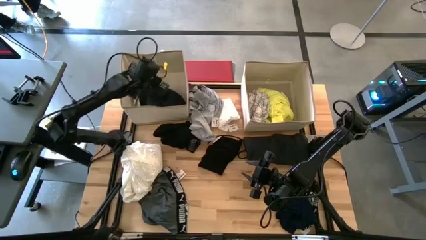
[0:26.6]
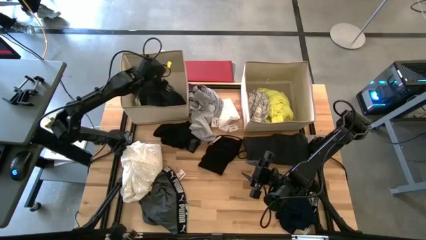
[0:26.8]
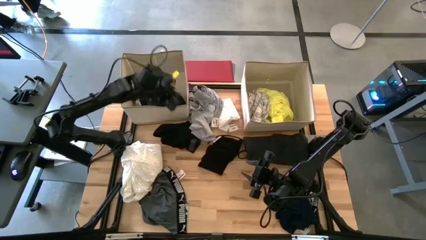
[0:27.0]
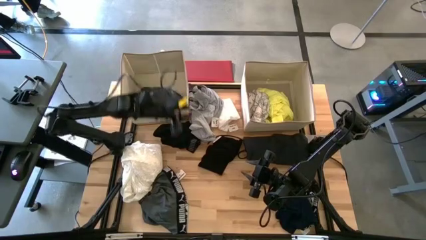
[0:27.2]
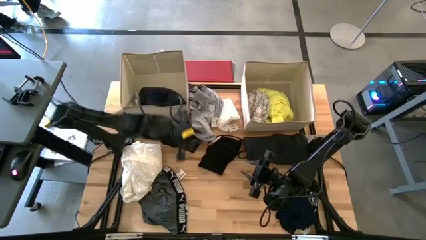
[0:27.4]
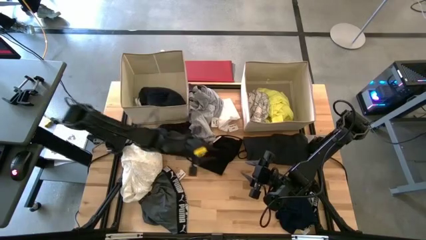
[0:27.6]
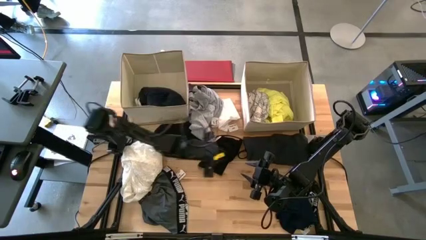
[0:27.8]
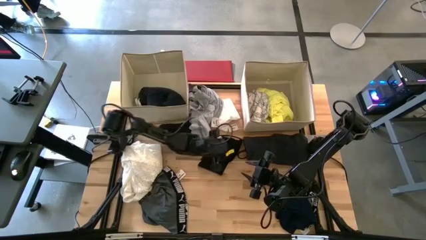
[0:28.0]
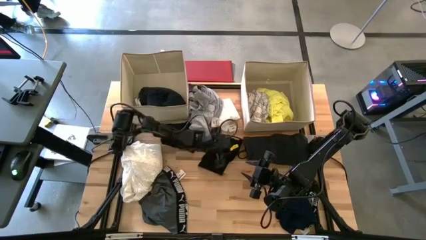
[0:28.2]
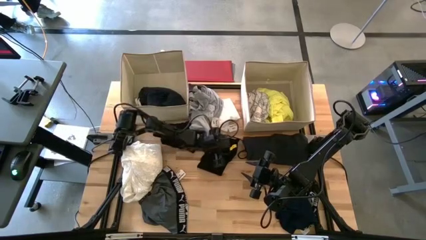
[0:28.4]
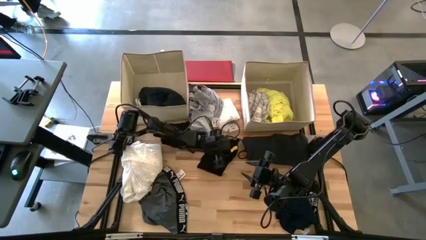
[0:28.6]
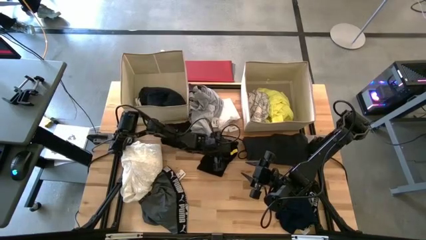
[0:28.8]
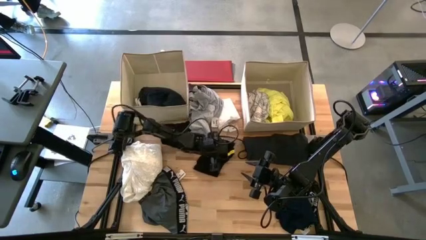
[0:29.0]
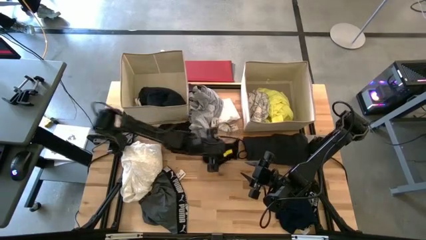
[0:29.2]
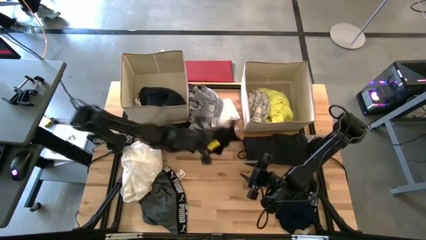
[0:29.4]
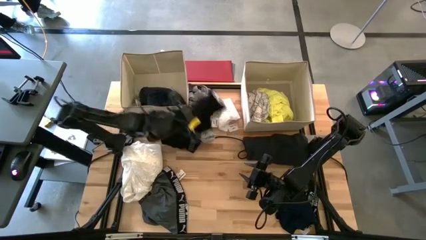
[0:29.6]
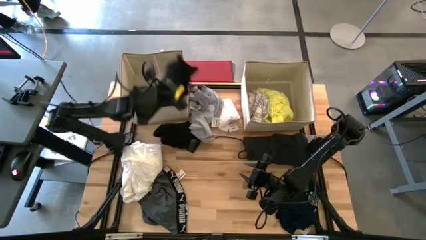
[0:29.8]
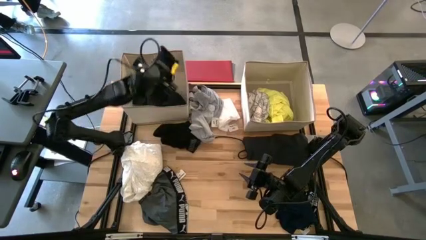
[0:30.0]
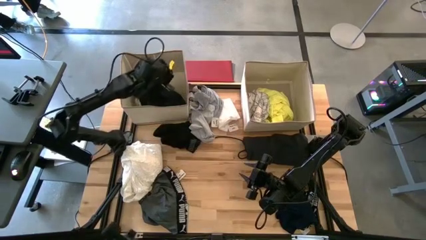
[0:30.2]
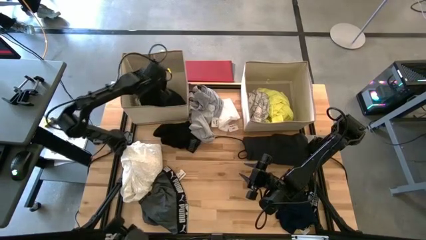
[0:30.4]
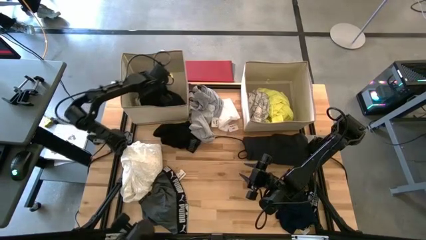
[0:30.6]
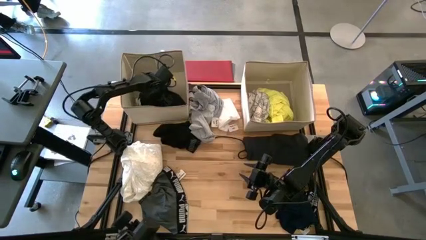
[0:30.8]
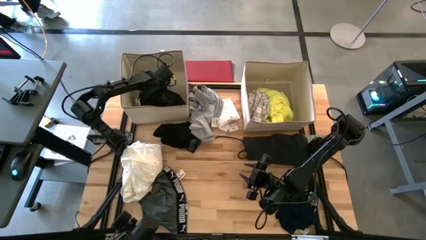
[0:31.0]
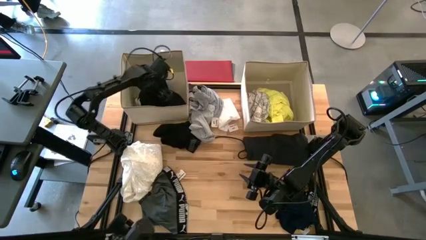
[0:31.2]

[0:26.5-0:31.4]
Task: Sort clothes
Put the black shirt into the left laundry organizer

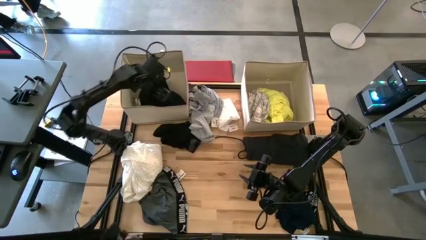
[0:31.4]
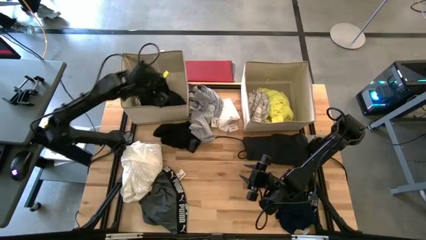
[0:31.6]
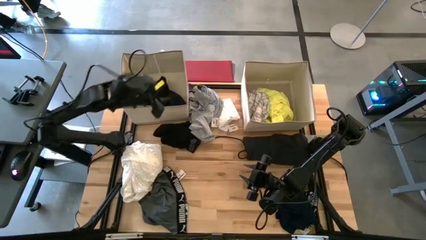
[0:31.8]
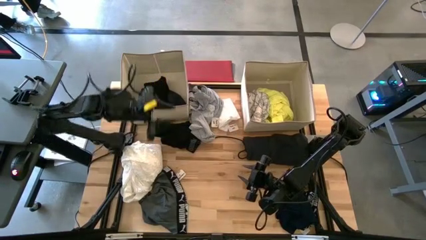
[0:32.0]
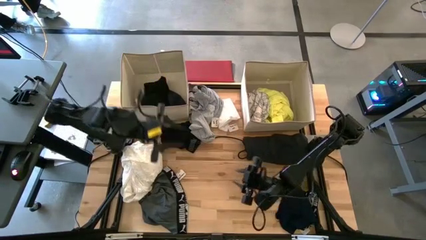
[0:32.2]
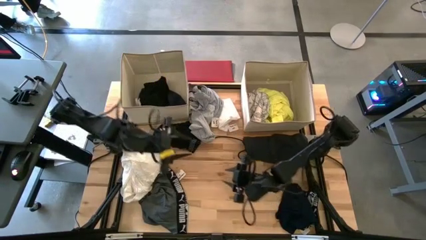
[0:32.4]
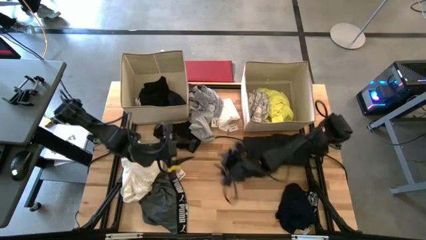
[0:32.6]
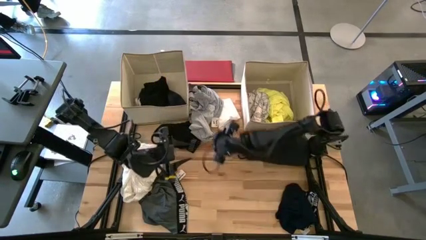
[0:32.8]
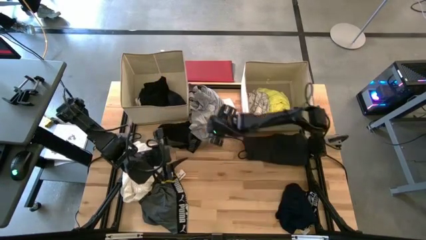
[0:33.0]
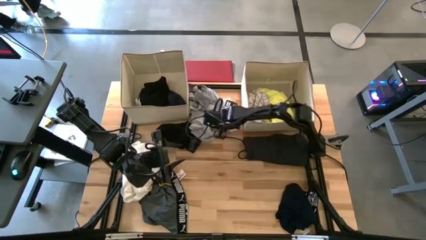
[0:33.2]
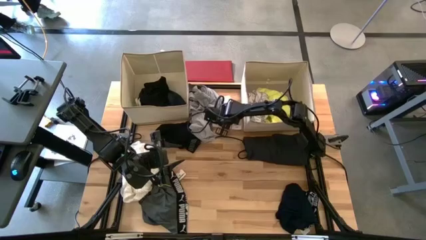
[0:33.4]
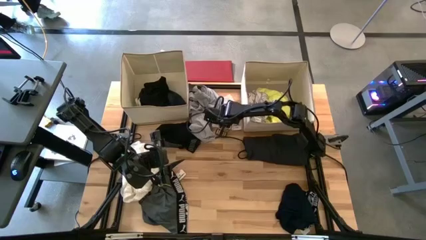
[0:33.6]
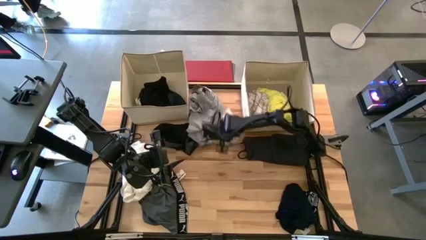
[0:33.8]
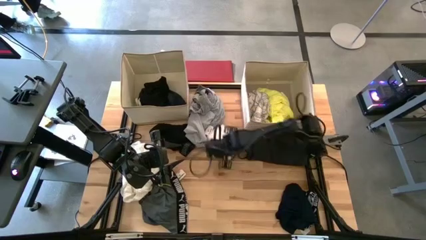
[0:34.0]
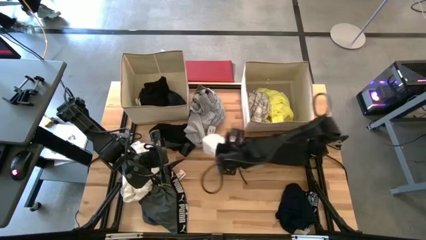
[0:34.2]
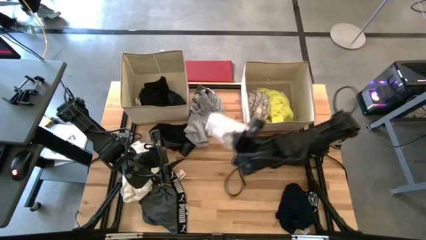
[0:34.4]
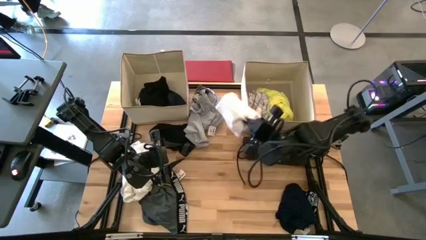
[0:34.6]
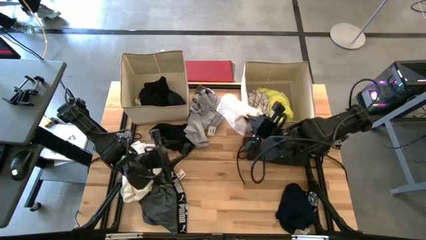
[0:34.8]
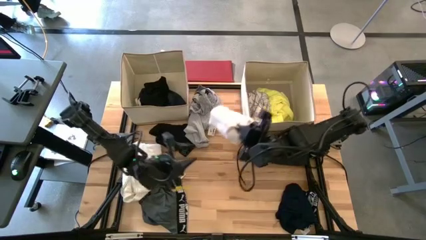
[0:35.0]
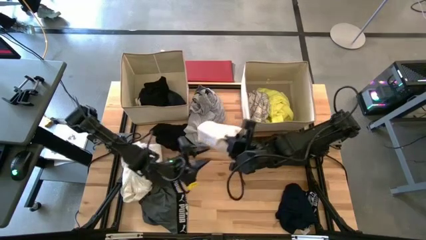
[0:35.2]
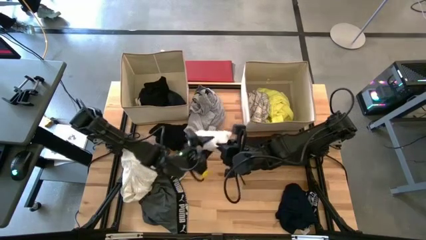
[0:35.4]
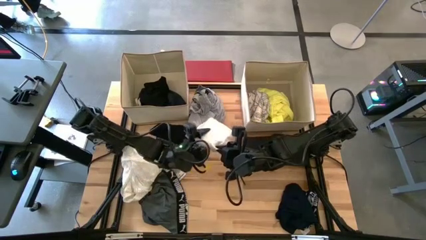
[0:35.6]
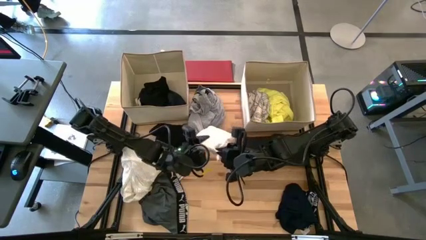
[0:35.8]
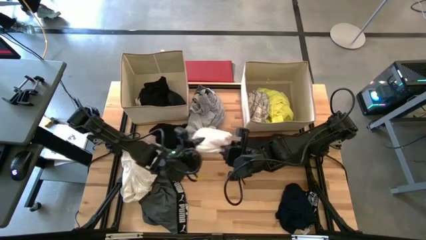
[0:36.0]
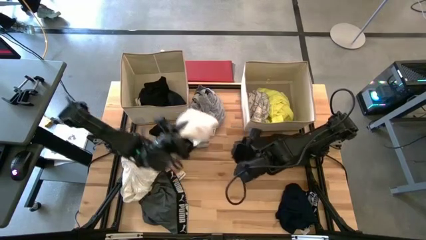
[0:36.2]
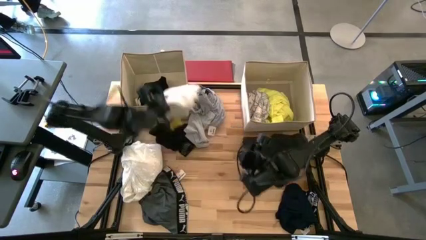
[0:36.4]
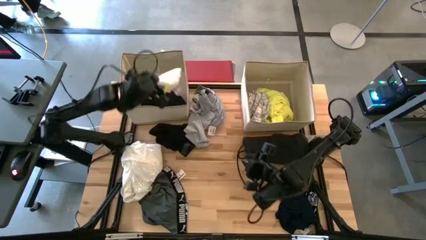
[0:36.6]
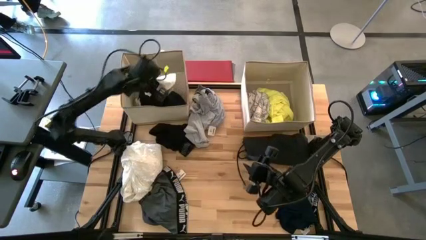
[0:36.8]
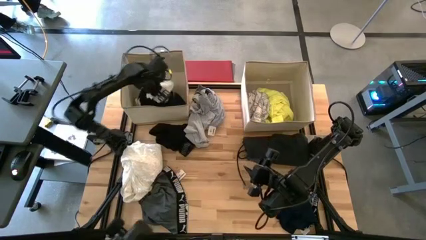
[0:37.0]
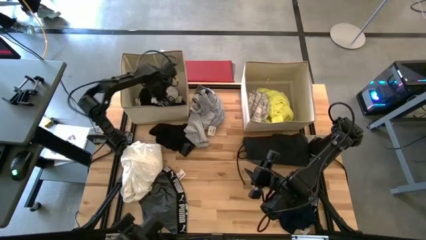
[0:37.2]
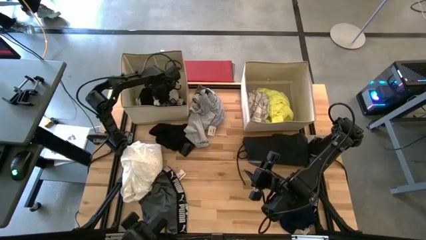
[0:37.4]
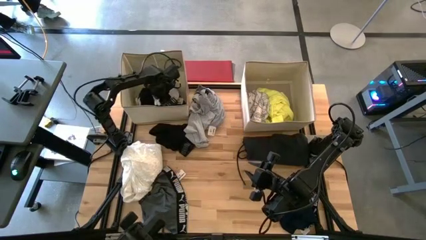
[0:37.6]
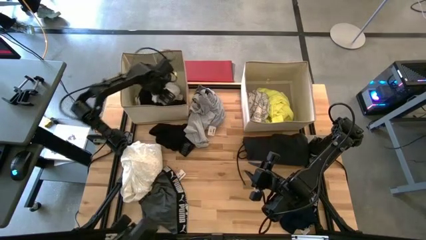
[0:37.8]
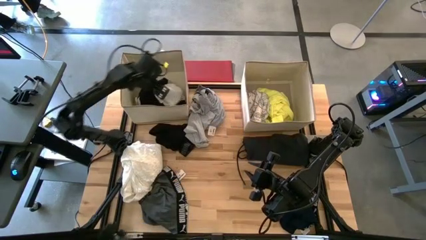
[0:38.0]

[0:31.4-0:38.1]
Put the white cloth into the left laundry organizer

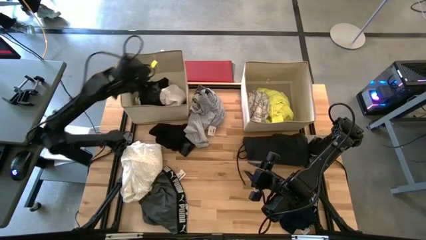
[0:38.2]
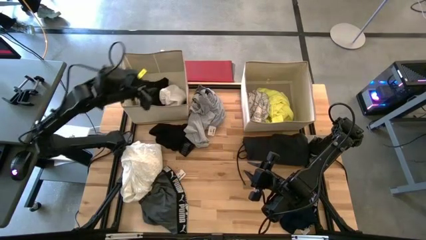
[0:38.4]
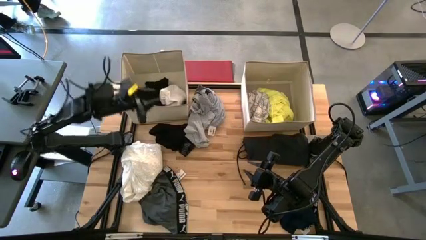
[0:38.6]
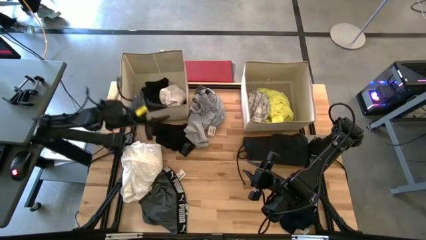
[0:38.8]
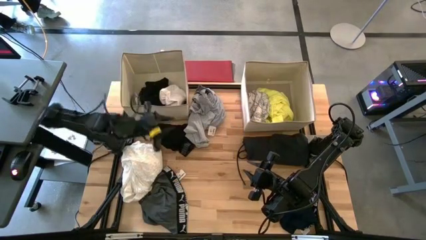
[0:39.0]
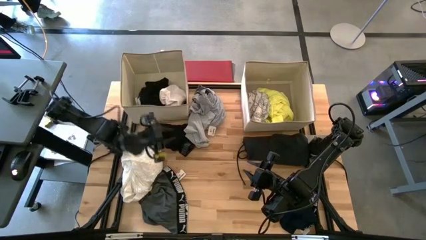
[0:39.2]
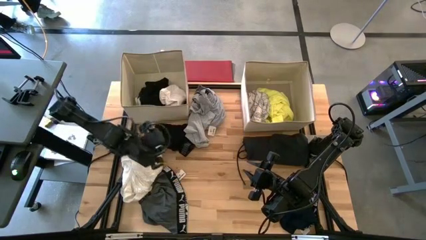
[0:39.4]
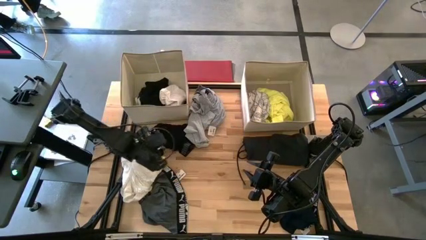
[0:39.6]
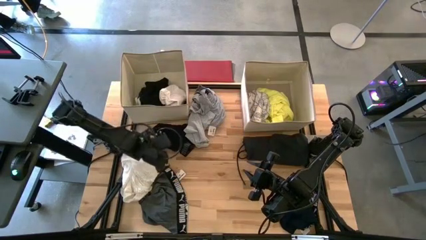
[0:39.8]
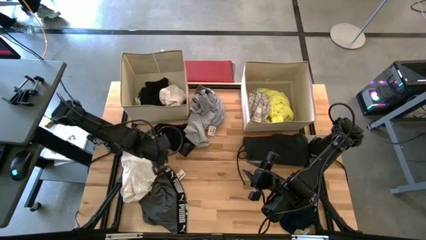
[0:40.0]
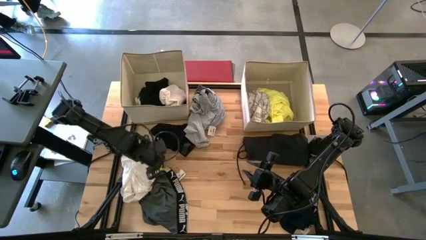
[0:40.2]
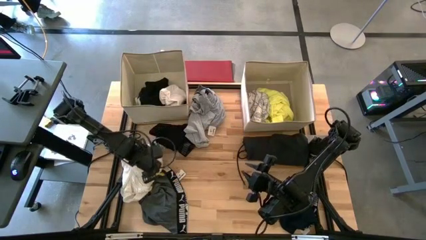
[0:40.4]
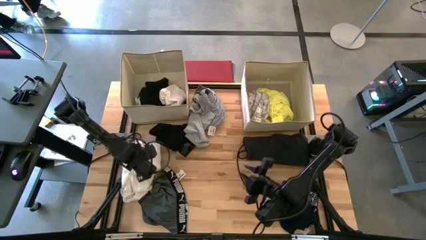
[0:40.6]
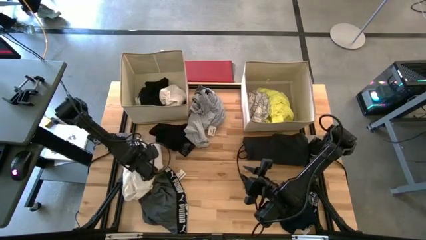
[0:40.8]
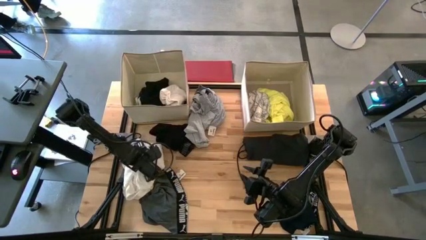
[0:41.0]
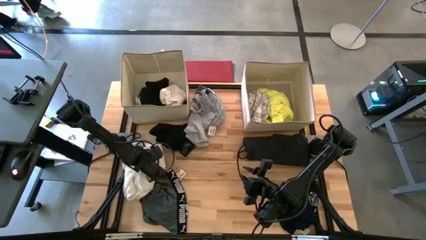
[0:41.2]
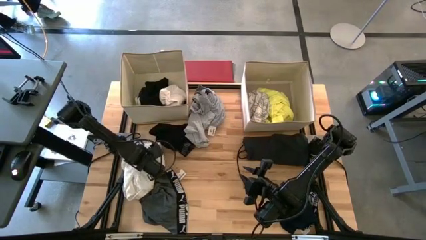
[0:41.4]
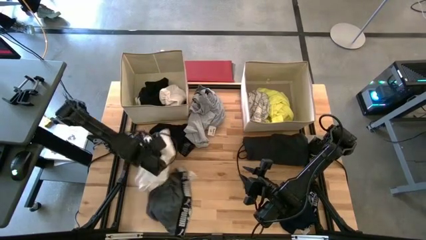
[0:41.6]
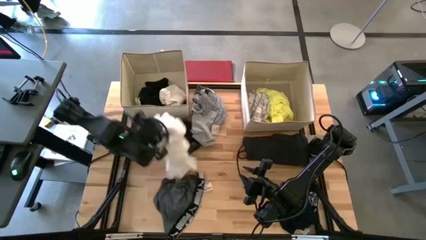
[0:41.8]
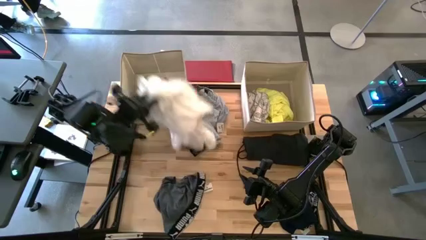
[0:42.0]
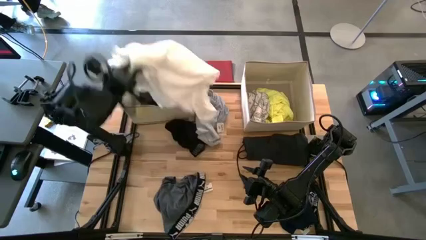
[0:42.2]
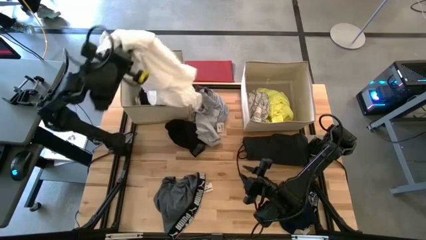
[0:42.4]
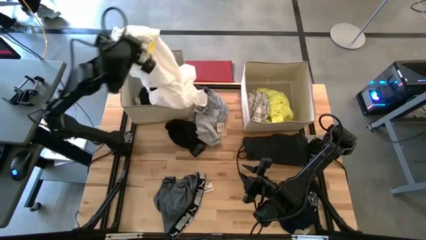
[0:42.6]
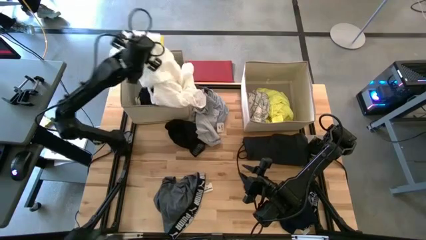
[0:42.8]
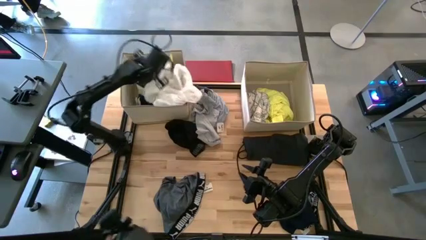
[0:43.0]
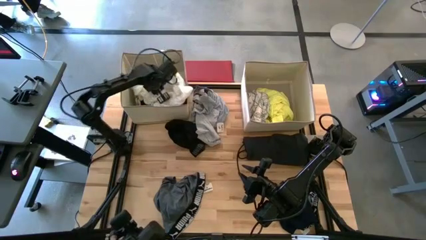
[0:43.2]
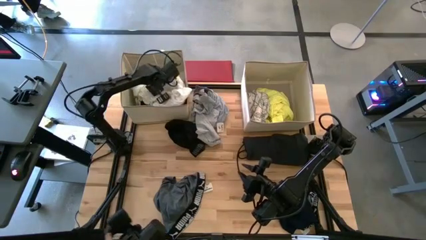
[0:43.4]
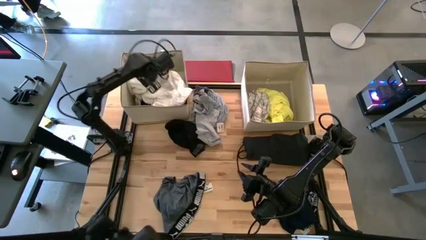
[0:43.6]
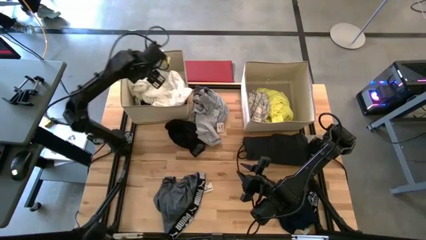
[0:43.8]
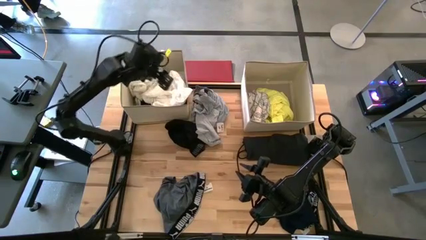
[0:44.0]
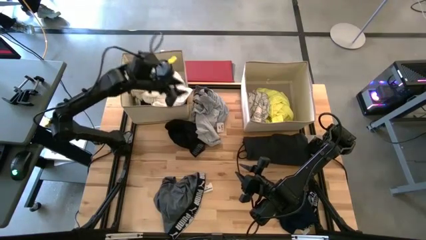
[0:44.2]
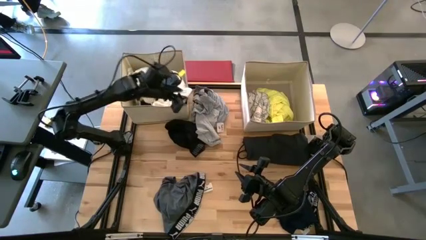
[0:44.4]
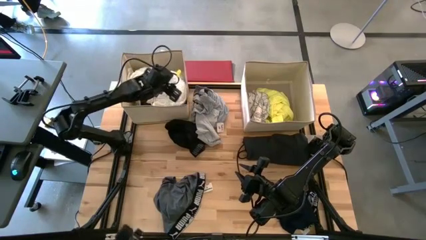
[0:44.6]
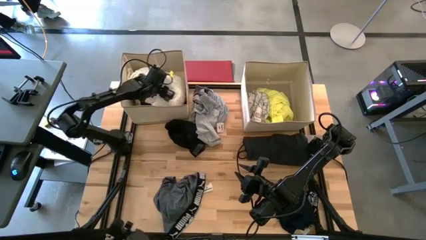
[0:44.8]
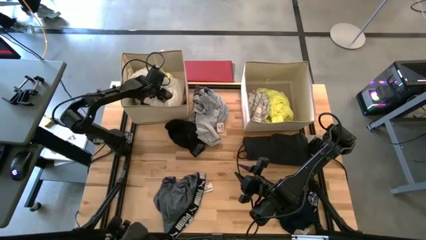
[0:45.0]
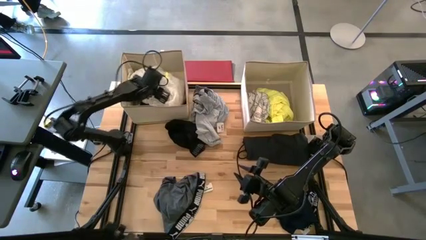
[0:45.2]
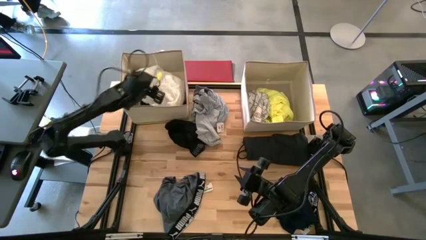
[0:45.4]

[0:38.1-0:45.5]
Put the white dress into the left laundry organizer
